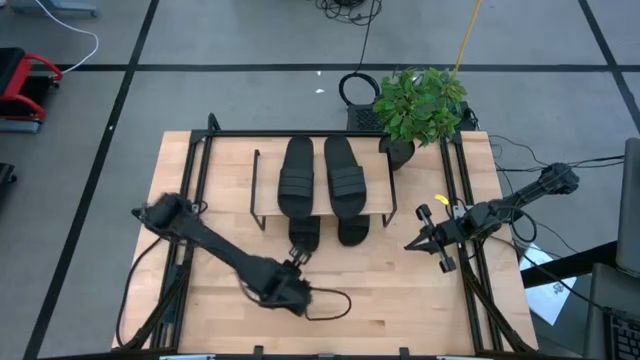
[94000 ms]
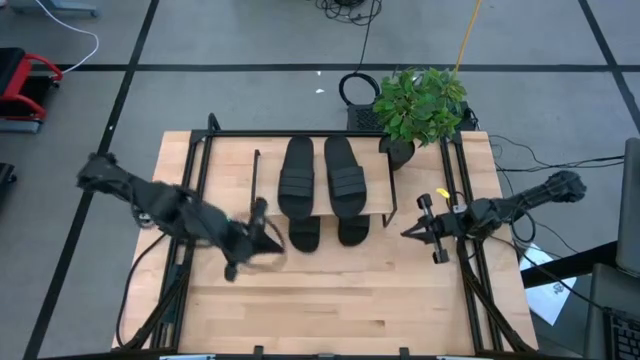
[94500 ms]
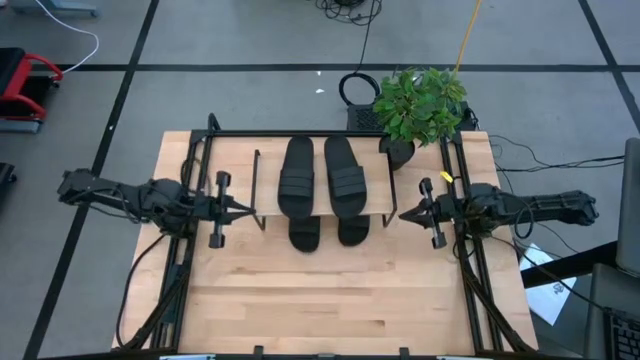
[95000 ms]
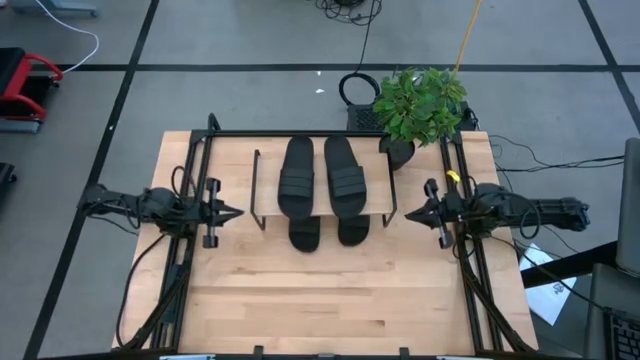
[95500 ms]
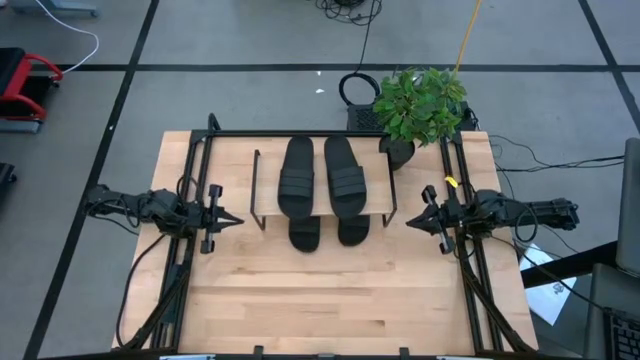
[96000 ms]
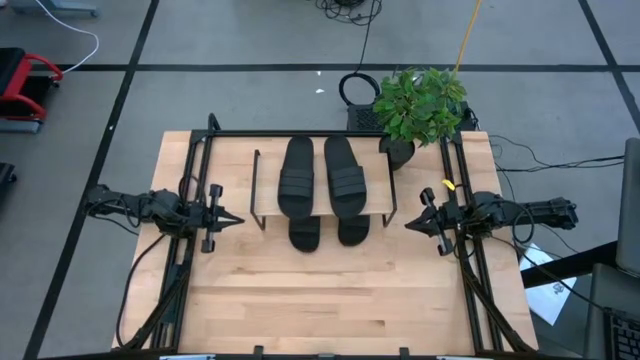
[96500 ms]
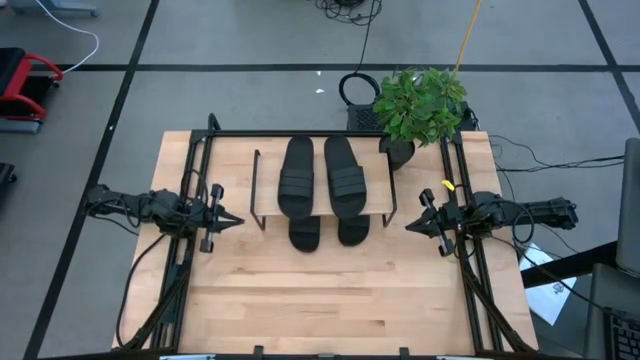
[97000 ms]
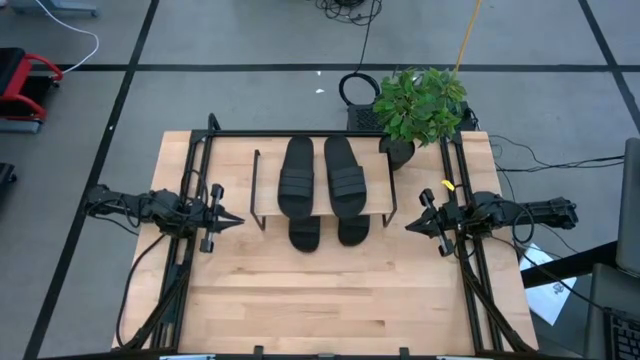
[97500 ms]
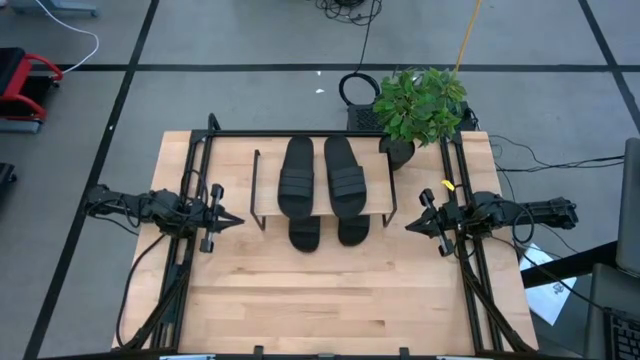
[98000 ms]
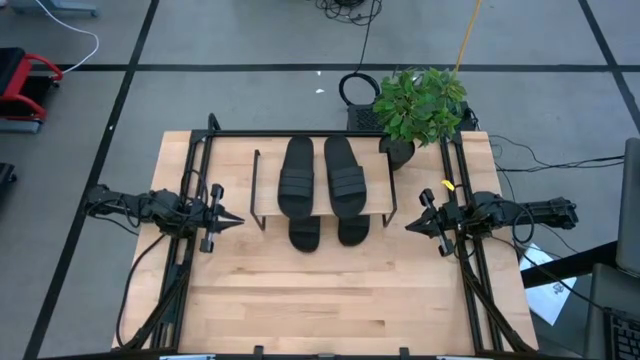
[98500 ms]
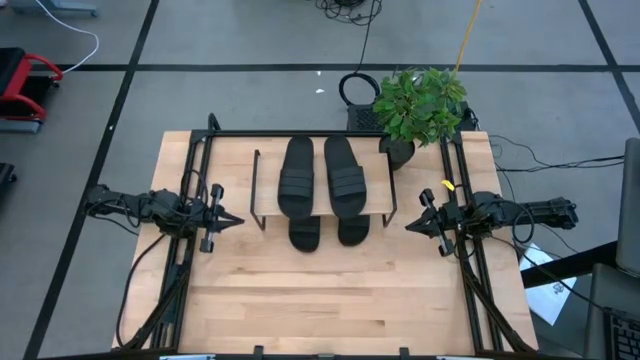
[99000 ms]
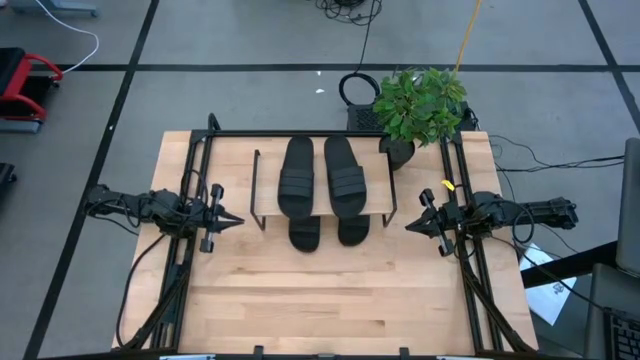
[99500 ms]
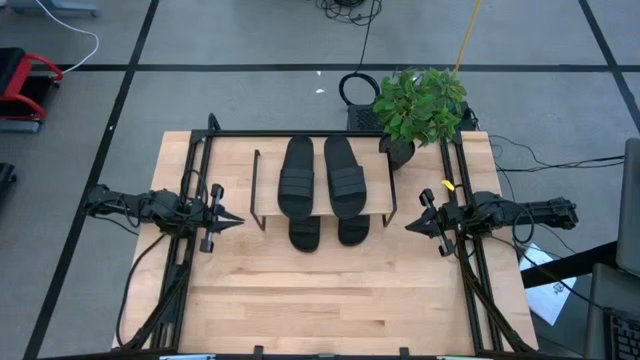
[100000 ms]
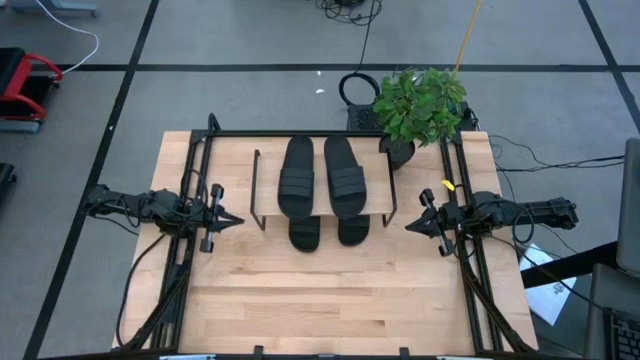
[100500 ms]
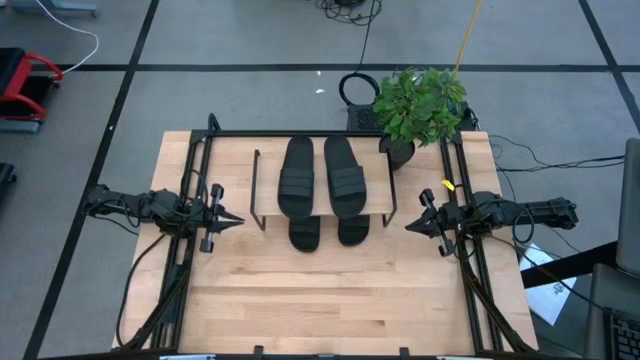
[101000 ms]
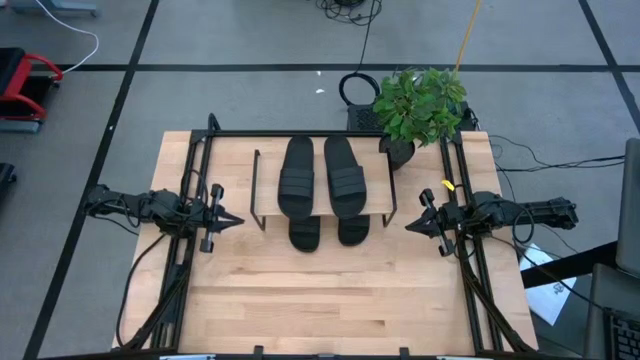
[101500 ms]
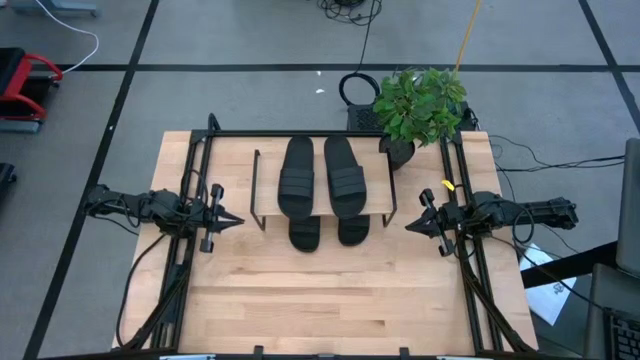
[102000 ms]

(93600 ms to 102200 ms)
Task: Pick and place slides into the shelf
Return to Home Position

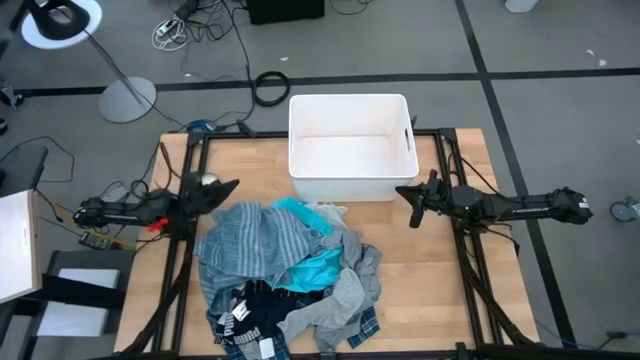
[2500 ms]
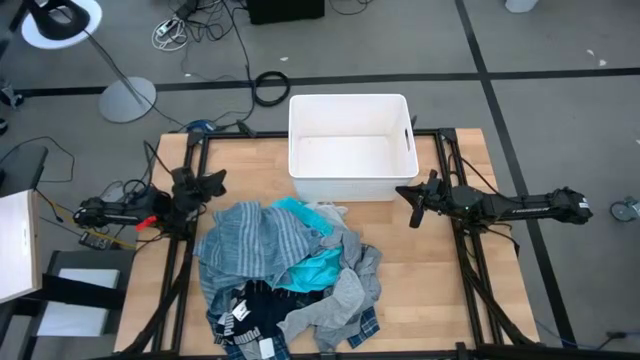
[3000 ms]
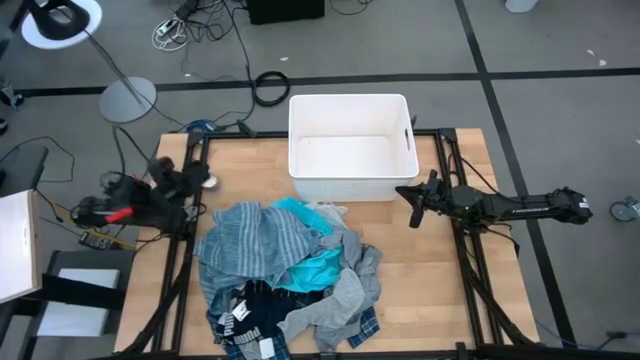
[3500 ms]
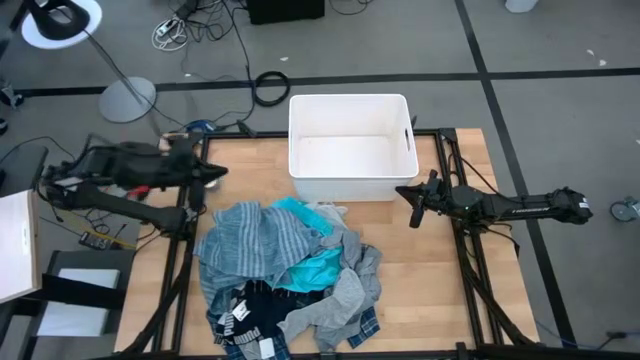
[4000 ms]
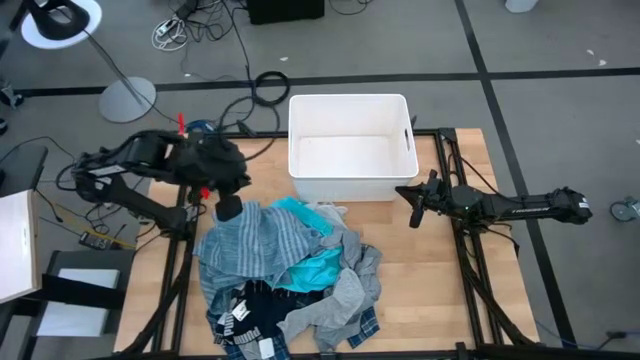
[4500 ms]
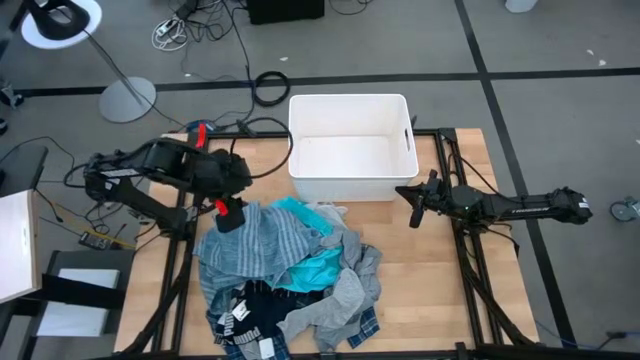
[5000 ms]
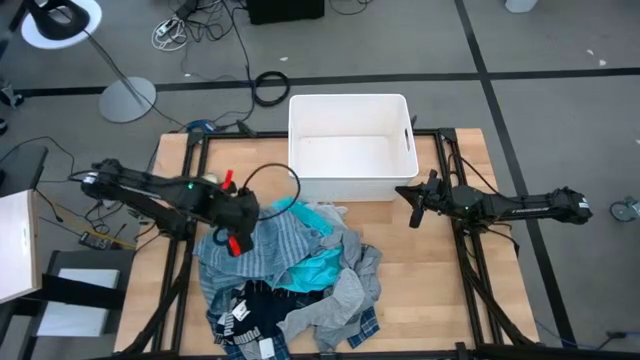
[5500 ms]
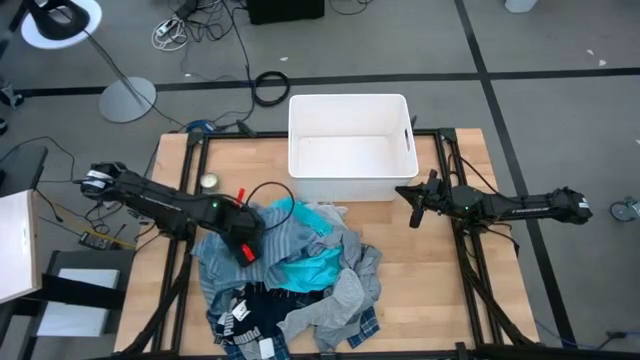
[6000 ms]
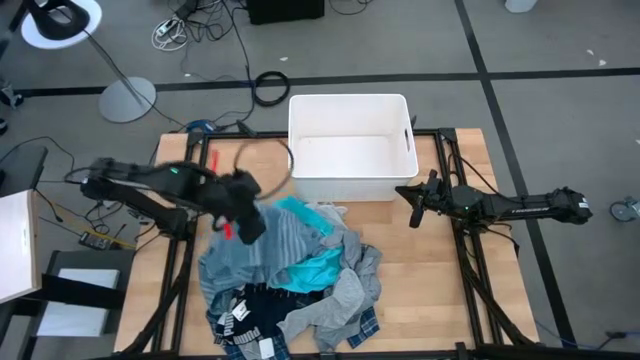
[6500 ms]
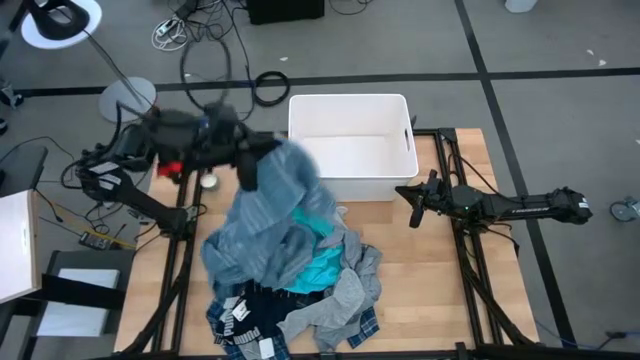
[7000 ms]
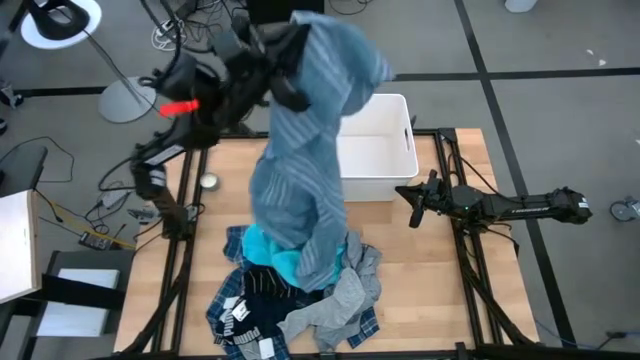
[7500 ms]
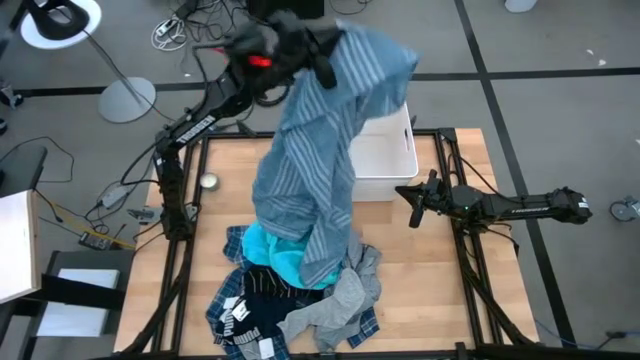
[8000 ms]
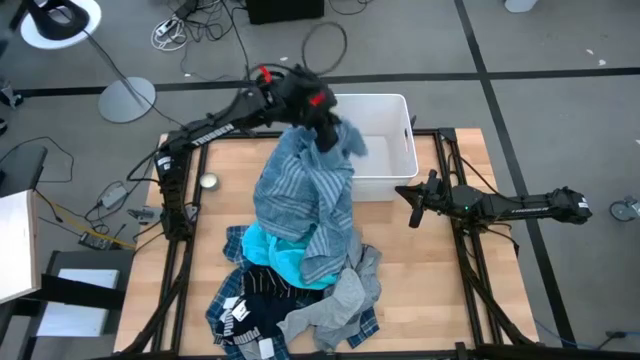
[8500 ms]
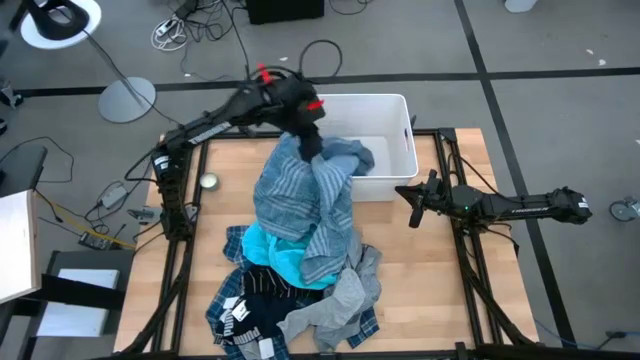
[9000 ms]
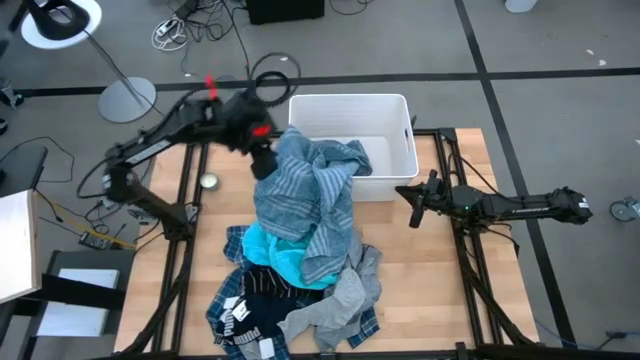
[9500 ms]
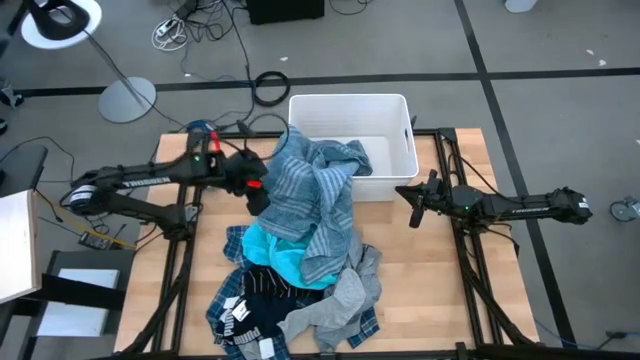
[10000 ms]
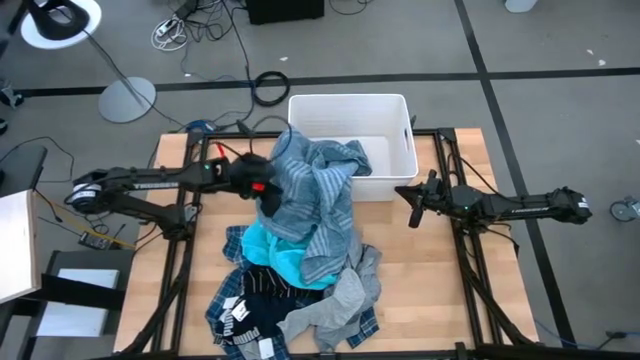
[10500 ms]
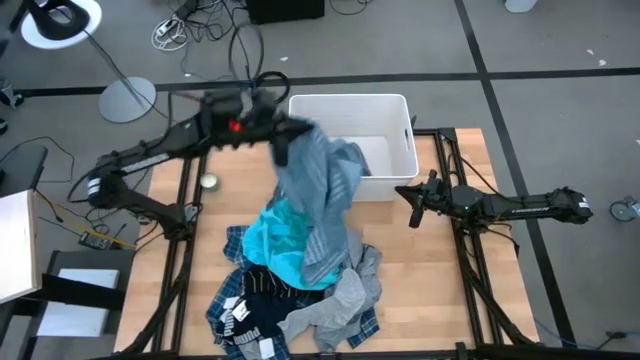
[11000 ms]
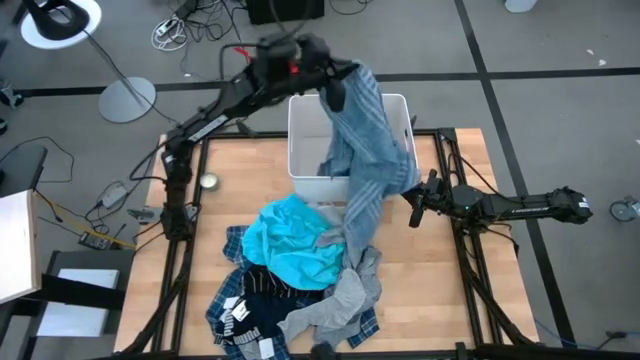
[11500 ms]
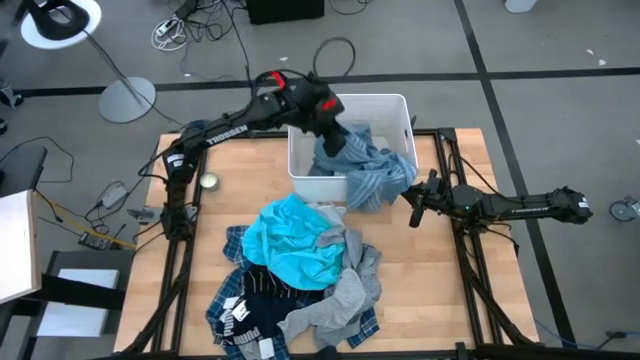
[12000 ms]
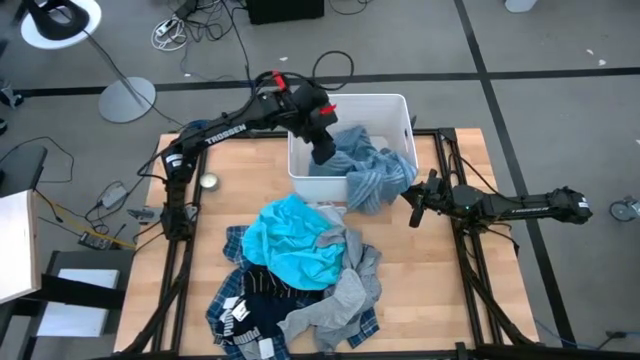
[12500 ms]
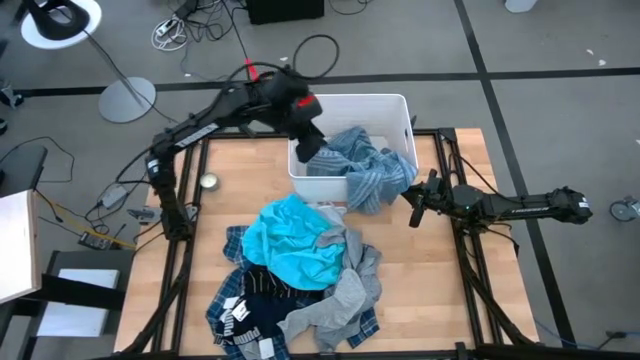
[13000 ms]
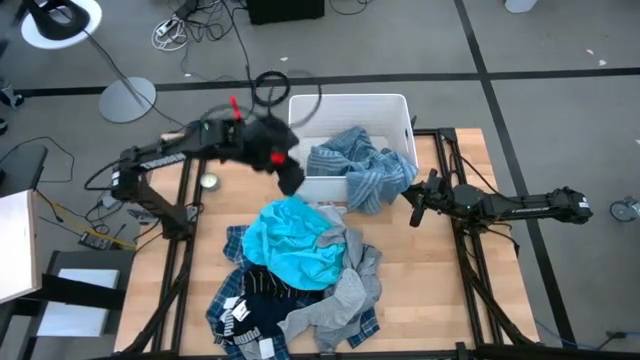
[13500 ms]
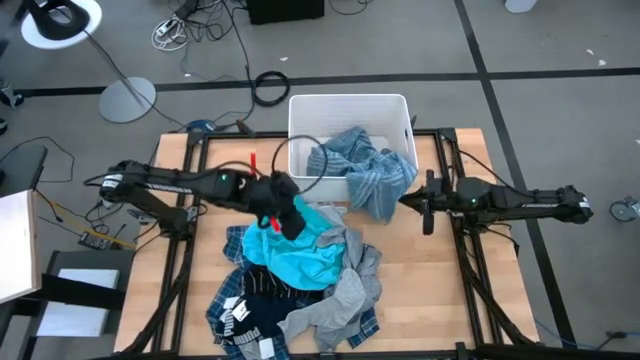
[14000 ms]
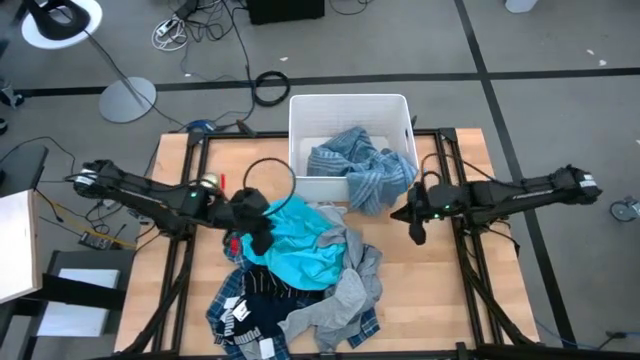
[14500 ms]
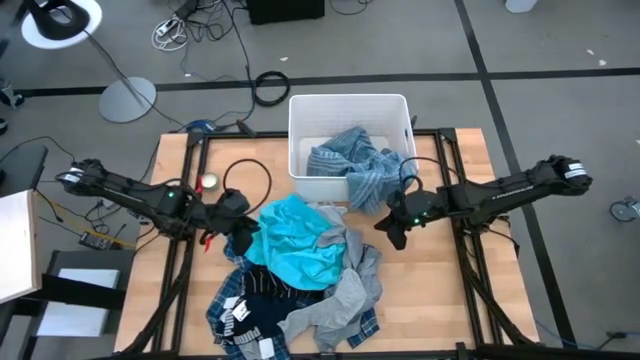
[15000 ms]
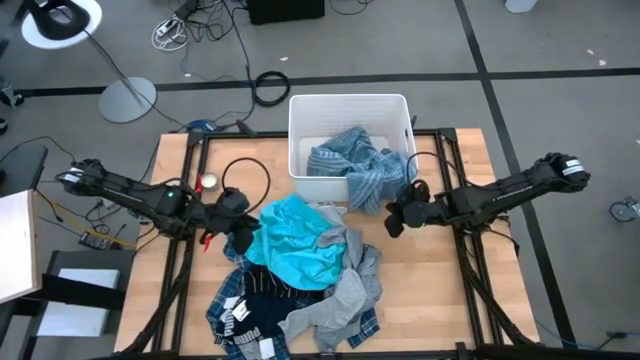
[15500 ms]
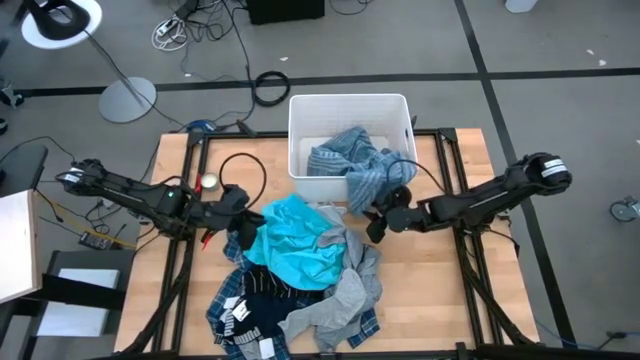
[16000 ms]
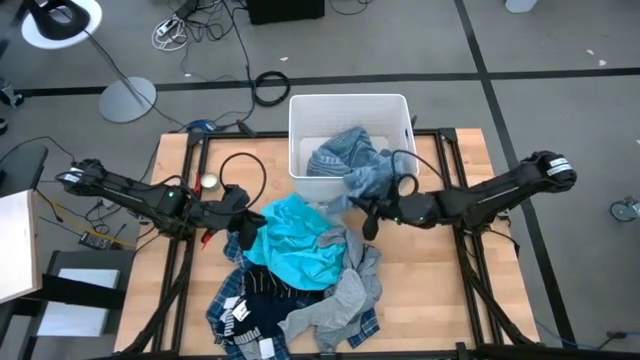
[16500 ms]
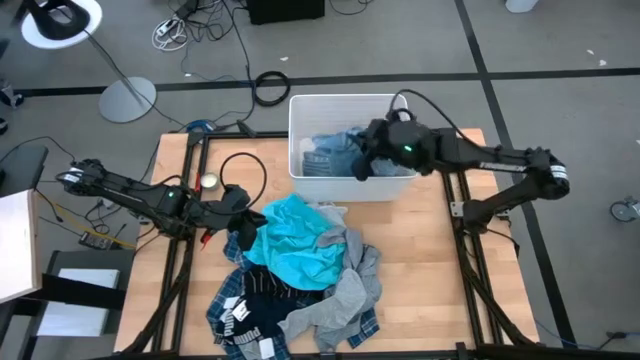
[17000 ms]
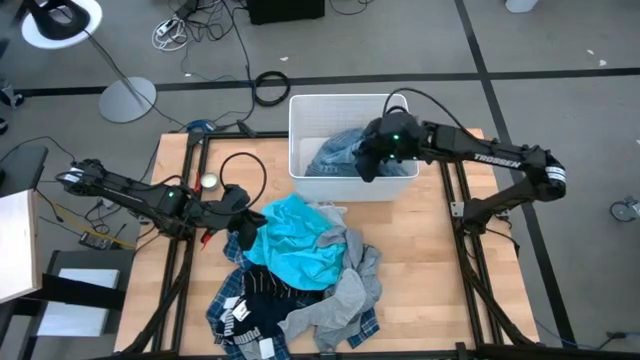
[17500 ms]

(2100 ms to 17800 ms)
Task: Sort clothes
Put the blue polo shirt into the white laundry bin
